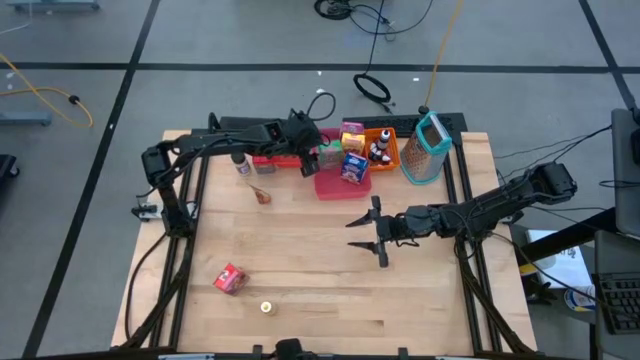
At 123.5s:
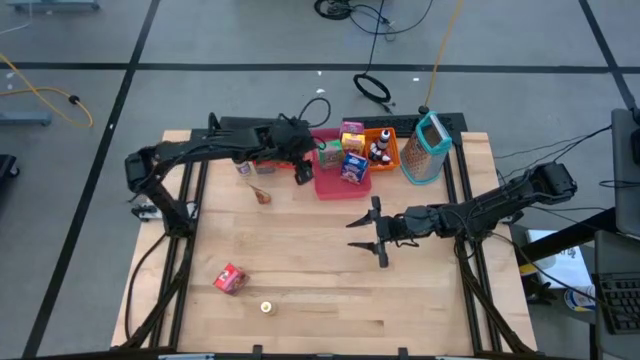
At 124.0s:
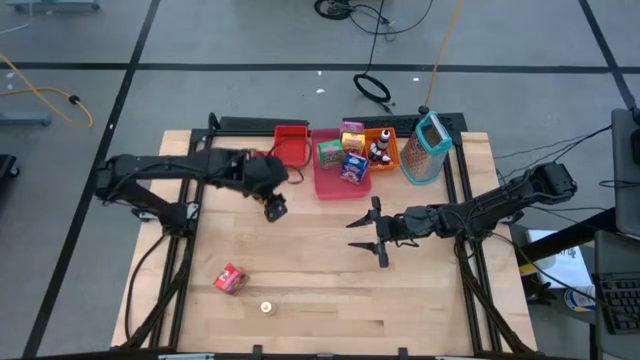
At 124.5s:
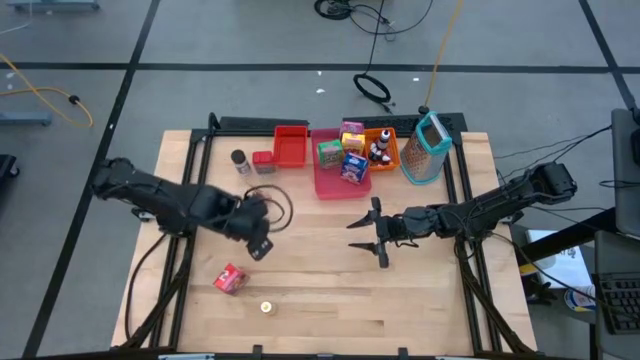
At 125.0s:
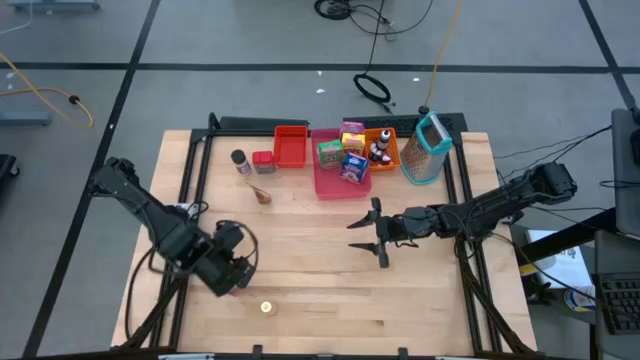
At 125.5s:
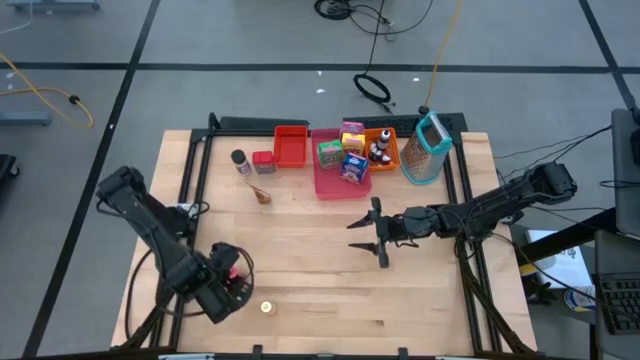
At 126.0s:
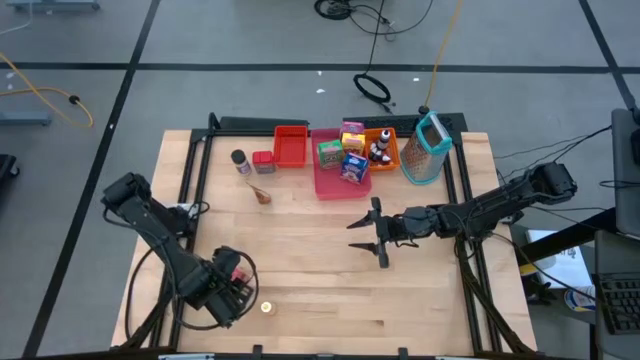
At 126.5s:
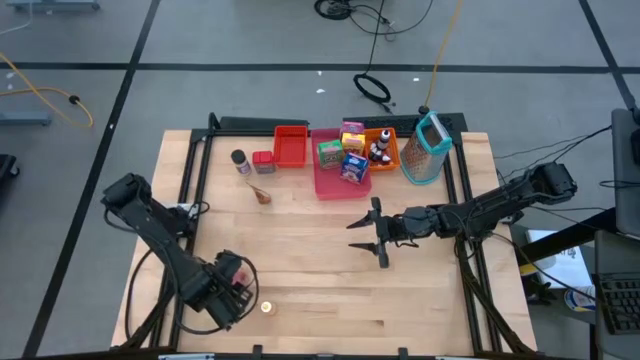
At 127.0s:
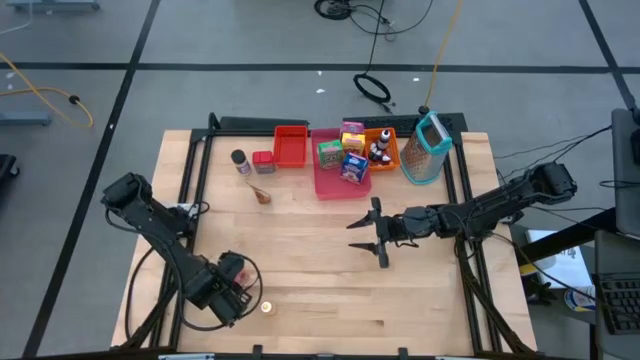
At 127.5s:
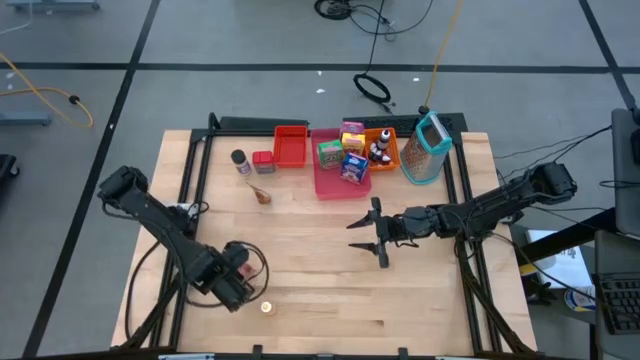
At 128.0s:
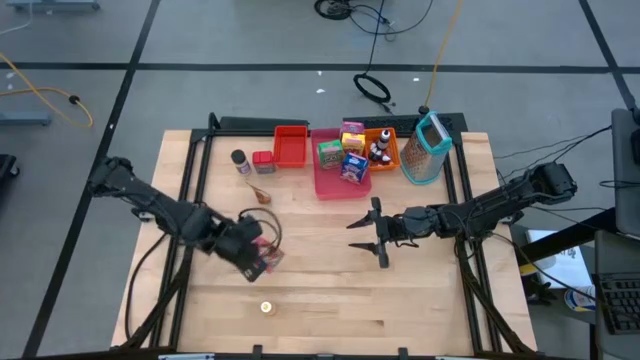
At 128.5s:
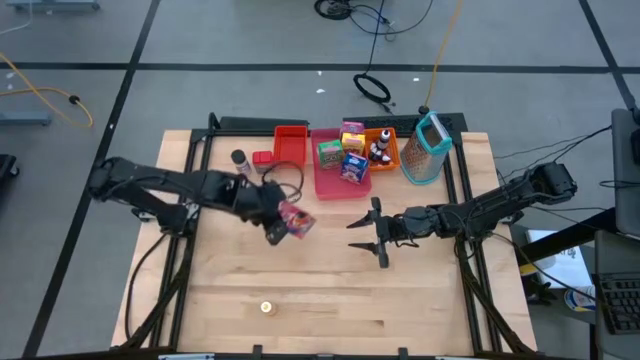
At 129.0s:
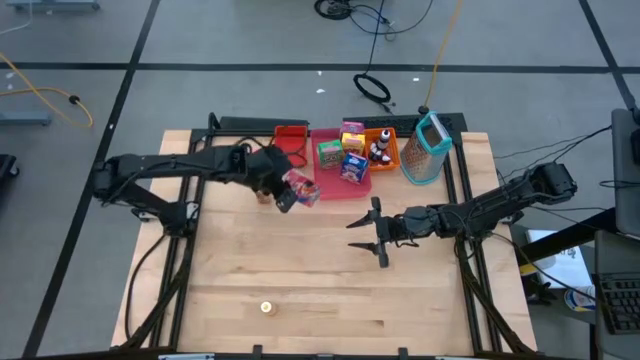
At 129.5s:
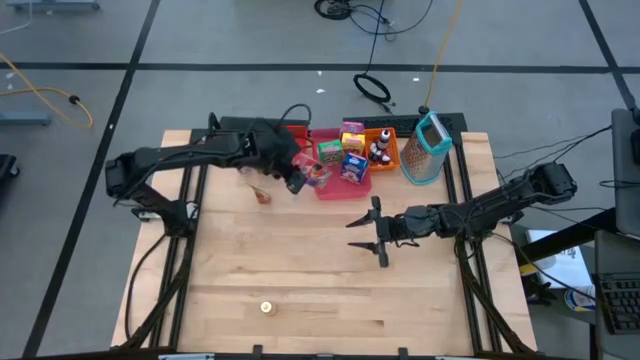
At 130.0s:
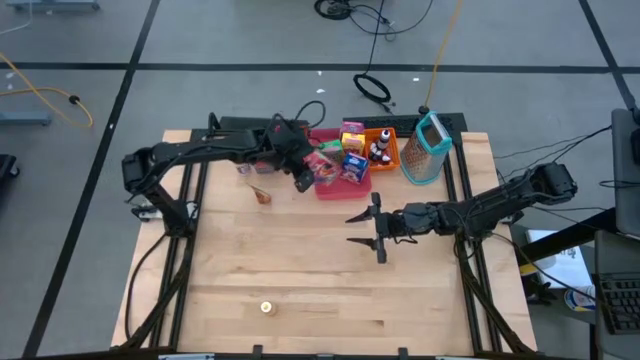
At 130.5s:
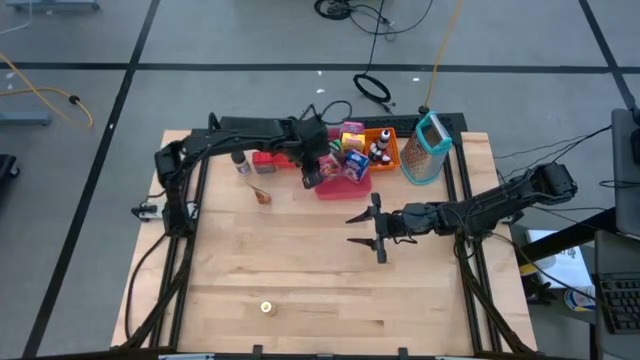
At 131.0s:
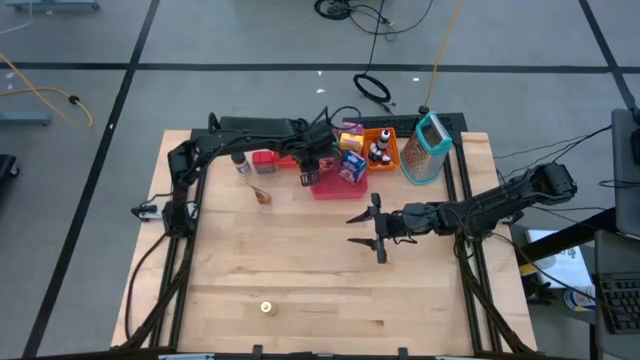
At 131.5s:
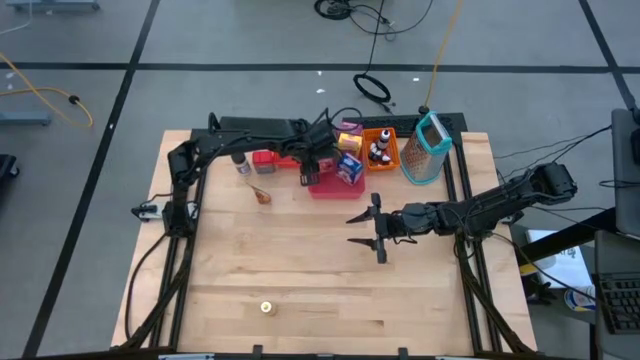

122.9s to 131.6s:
Task: Pick & Place Kitchen Items
Put the red cereal box into the pink bin

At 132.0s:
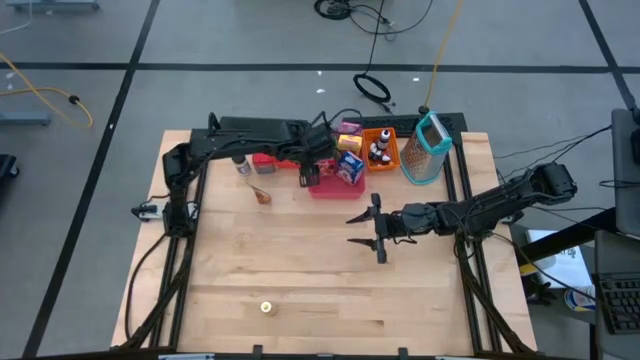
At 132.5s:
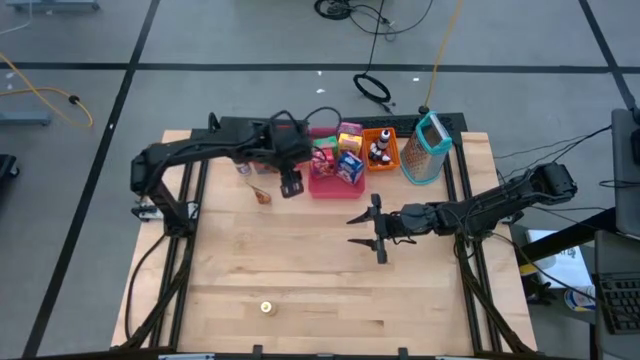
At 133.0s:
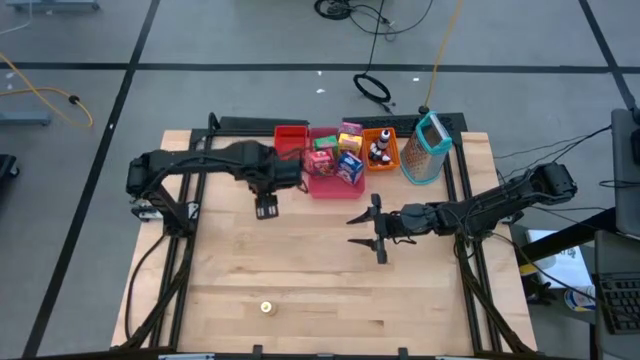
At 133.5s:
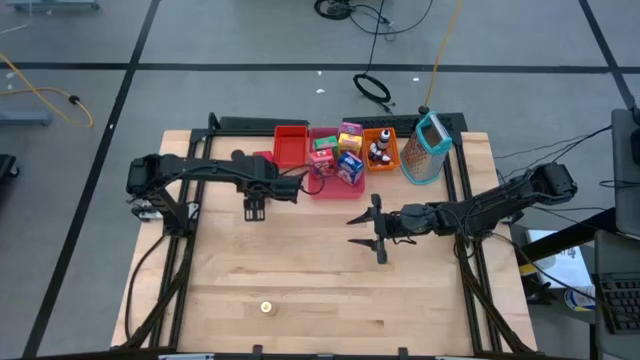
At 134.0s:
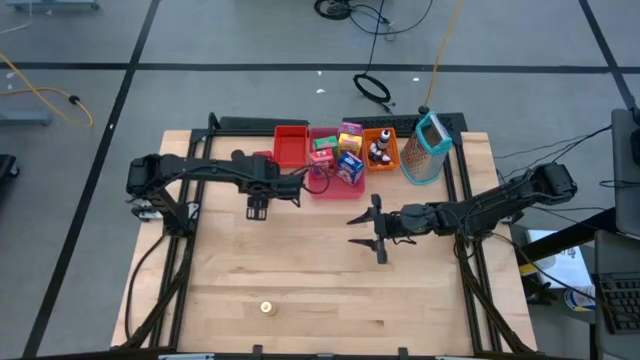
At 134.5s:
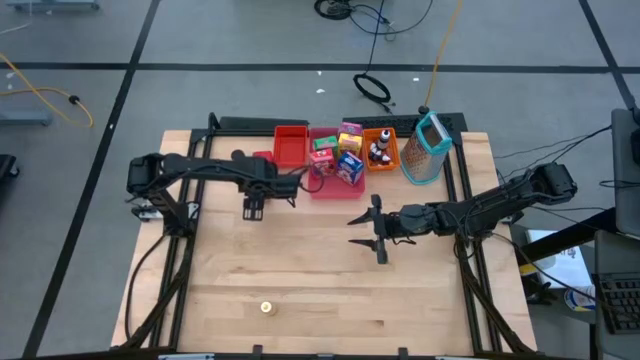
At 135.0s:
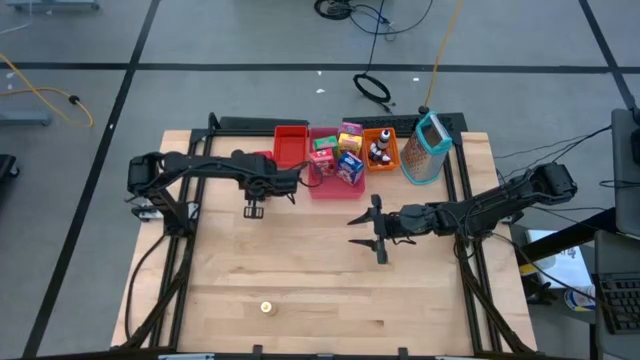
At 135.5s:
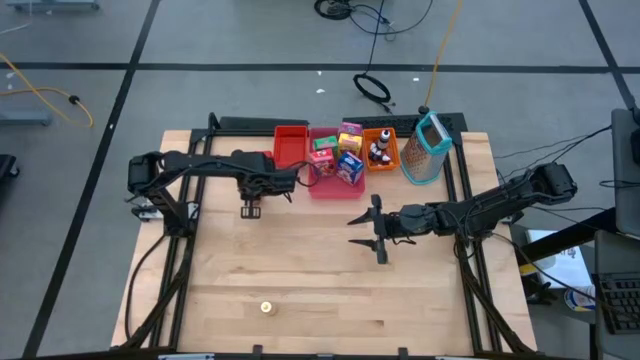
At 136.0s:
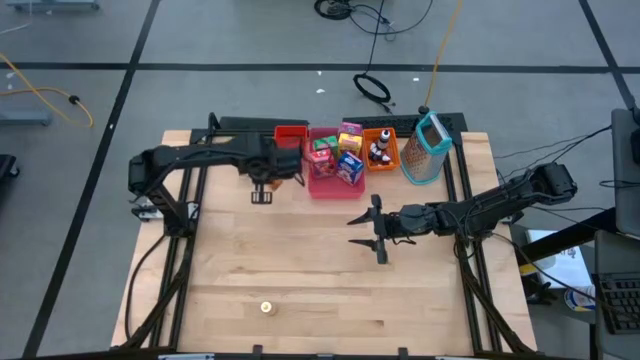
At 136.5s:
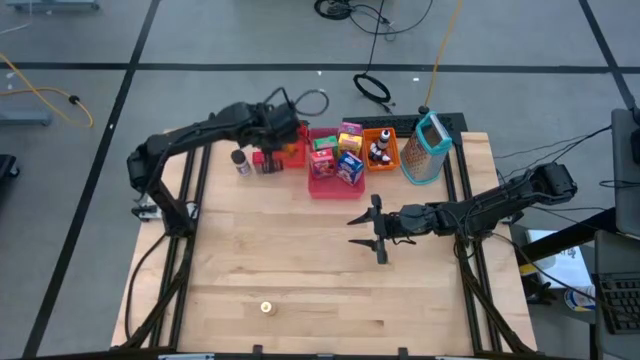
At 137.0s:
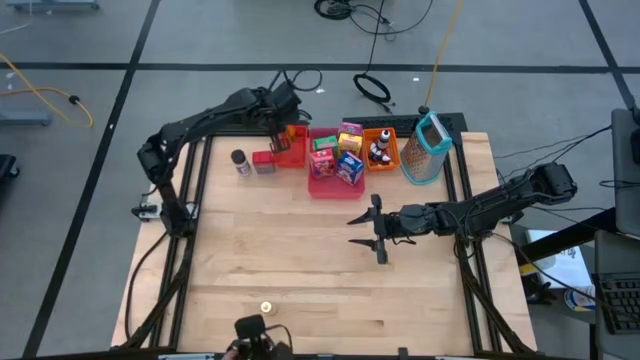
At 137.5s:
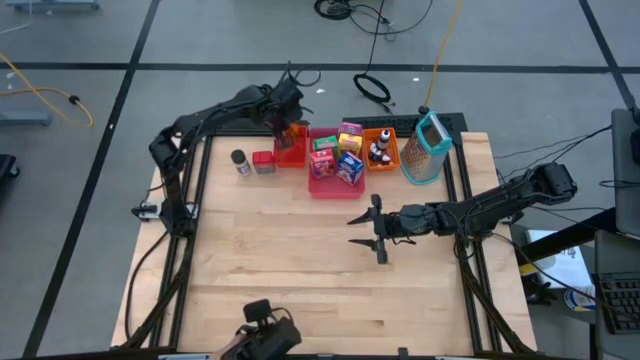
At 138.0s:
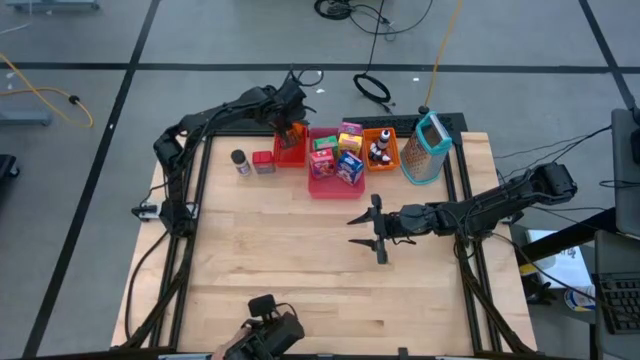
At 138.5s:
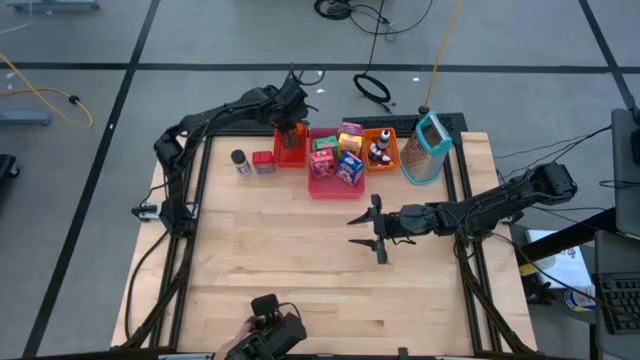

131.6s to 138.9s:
Put the orange seasoning pack into the red bin

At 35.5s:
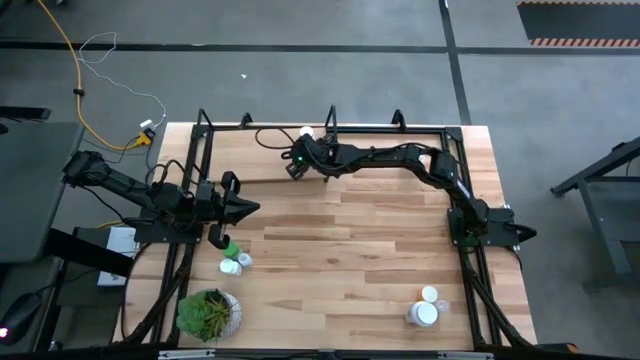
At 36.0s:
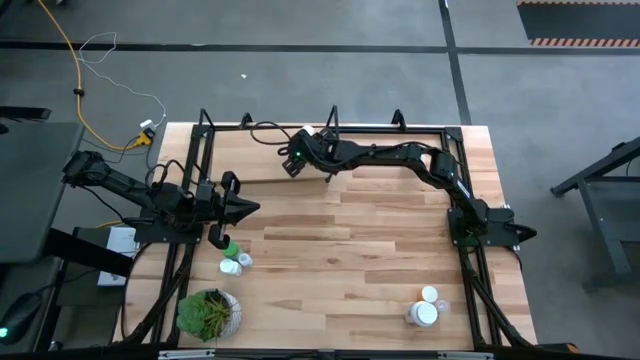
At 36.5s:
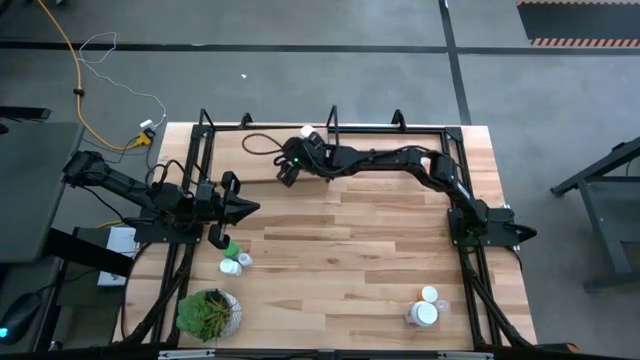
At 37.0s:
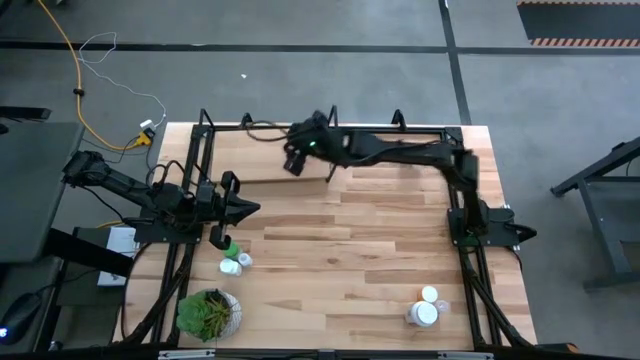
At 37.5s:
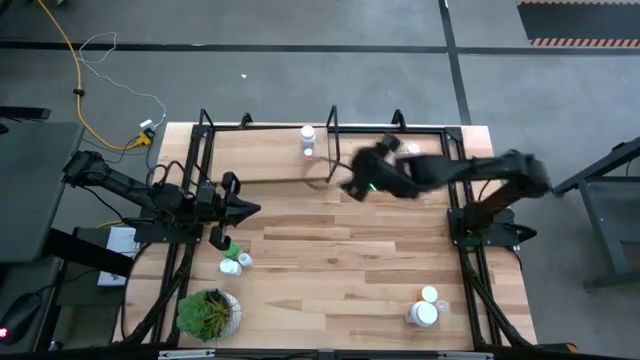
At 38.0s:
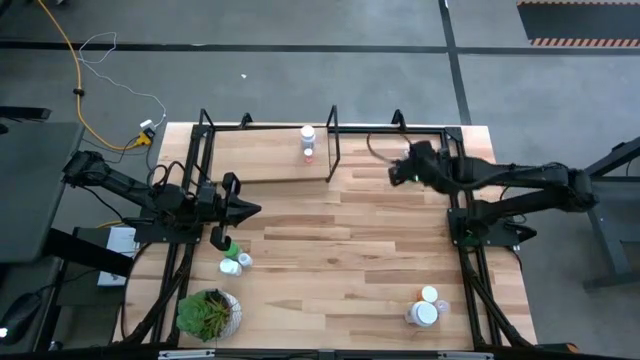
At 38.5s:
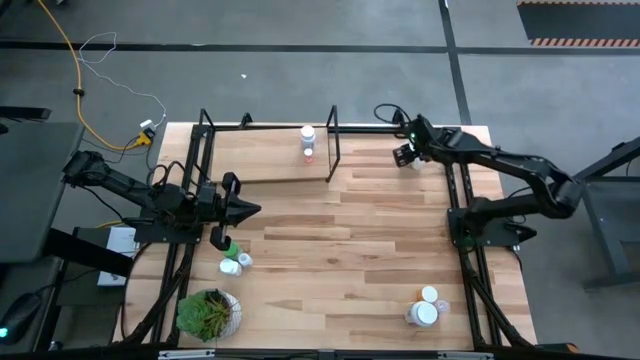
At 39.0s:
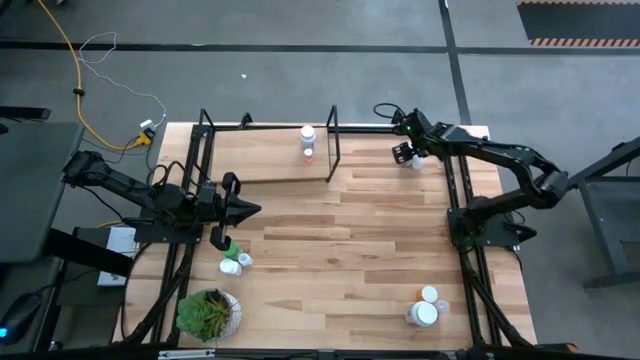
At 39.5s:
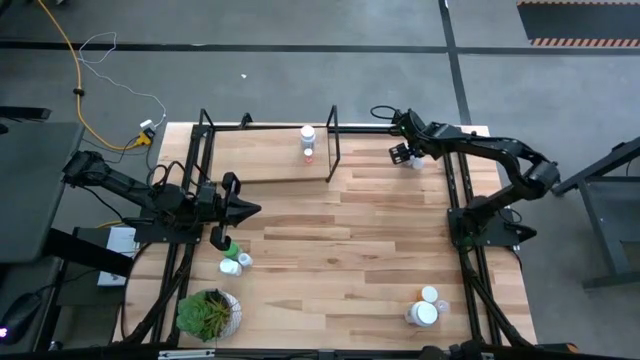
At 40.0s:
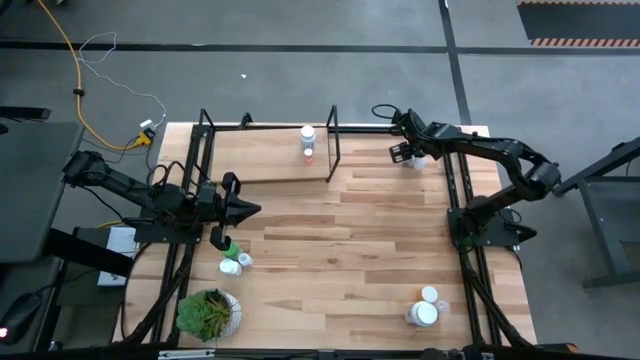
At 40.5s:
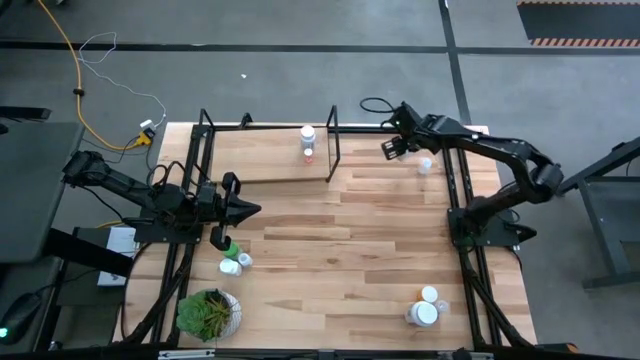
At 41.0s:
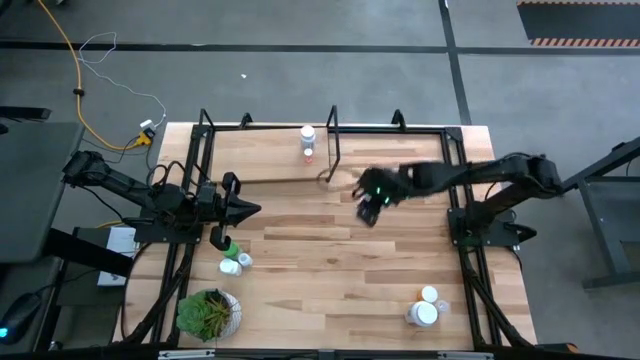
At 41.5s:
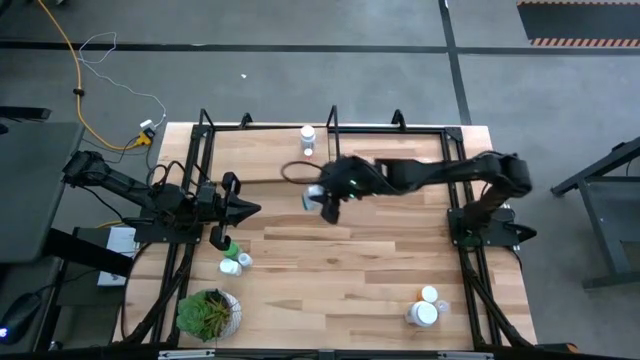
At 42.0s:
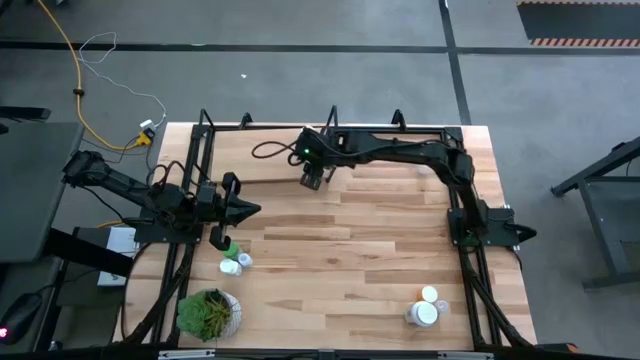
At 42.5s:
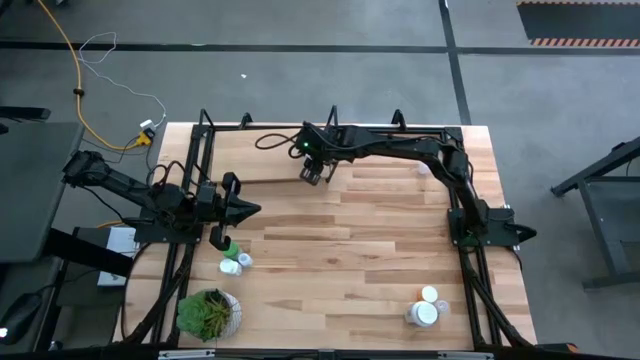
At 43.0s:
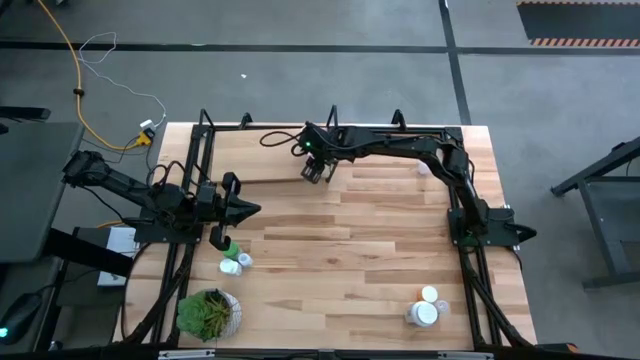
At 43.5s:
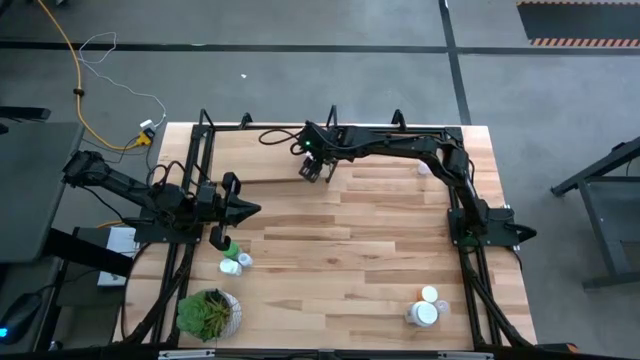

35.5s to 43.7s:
Task: Pick and place medicine bottles onto shelf by color
Put the big blue pill bottle on the shelf
